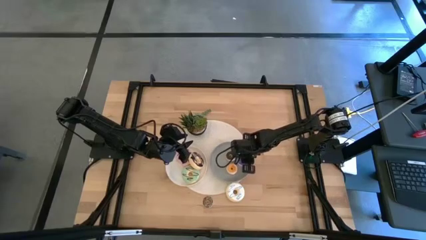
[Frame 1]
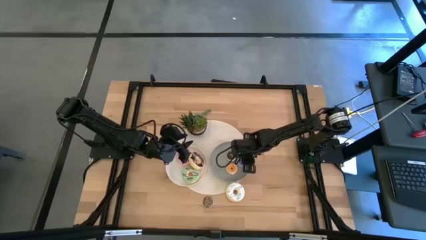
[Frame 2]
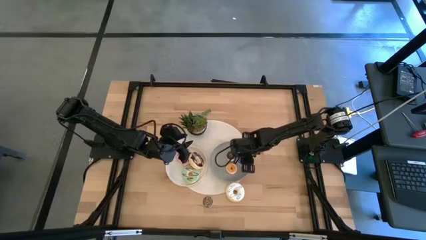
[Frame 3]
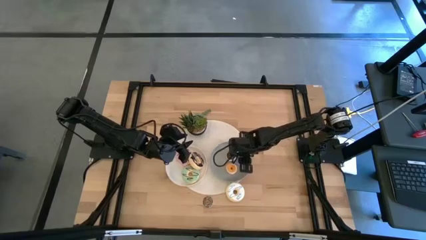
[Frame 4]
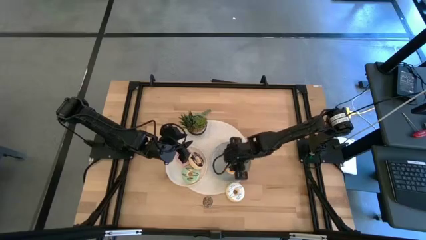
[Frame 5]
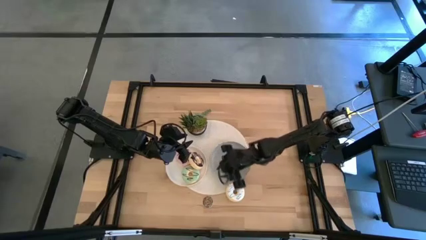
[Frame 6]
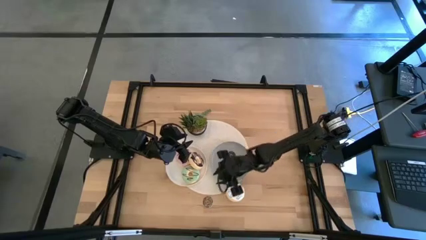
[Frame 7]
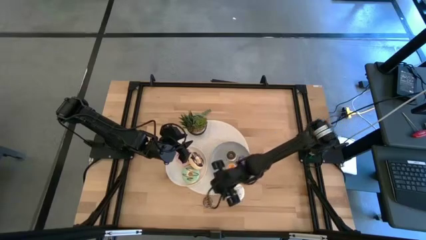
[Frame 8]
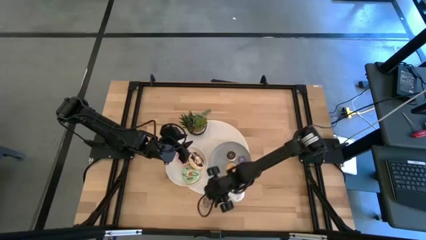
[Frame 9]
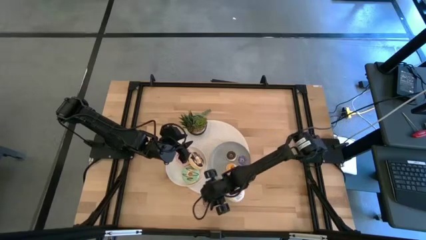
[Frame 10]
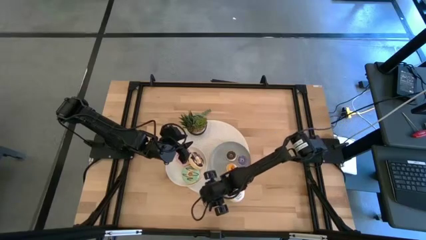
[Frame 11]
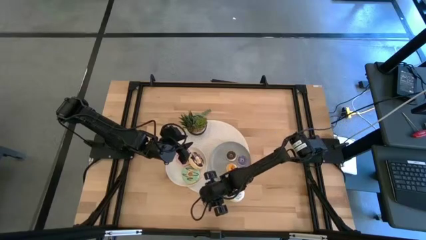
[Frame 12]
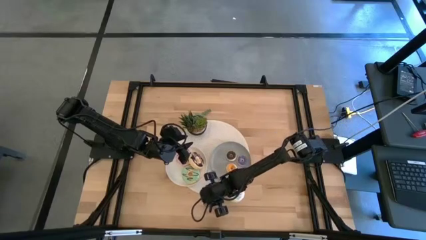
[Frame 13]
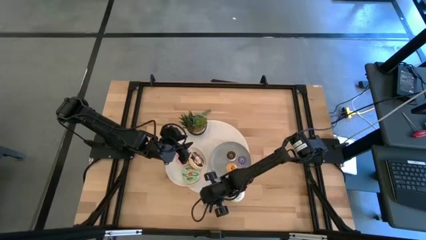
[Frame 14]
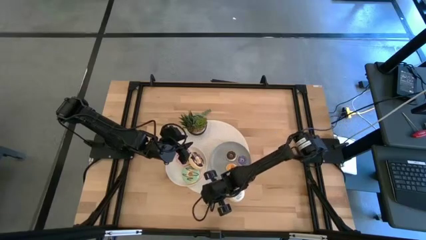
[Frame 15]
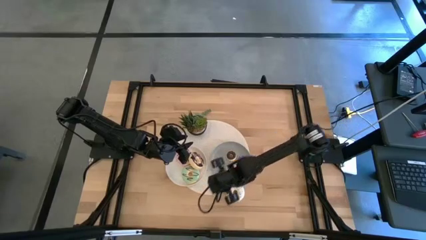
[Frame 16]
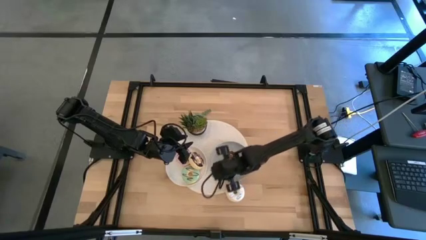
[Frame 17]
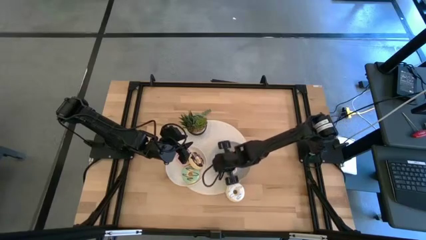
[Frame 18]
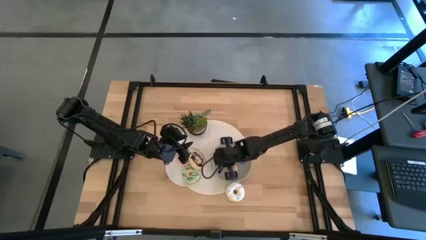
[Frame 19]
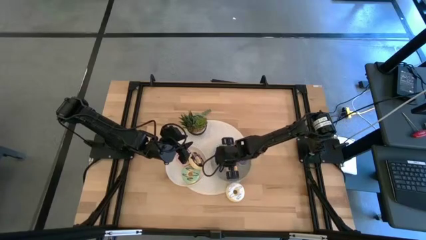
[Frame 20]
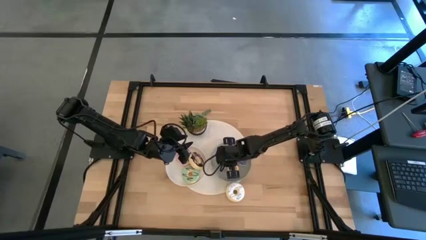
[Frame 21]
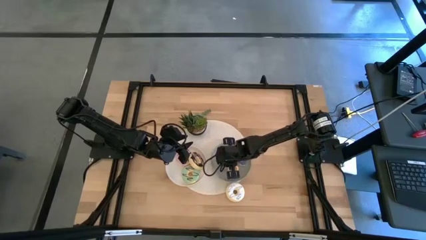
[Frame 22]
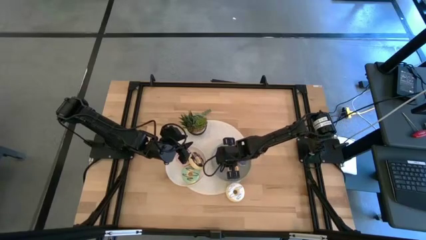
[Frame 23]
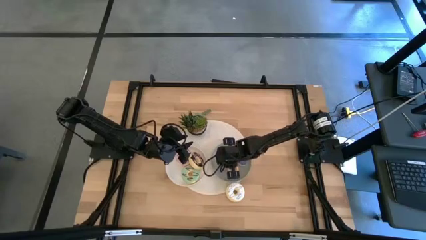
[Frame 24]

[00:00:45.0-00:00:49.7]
Task: Pick & Place donuts
Put the small brown donut onto the gray plate

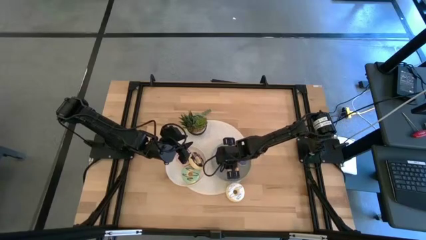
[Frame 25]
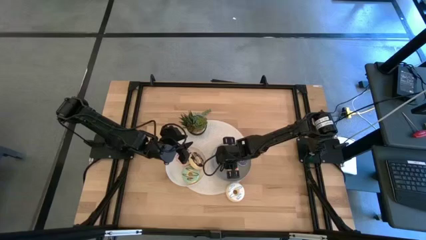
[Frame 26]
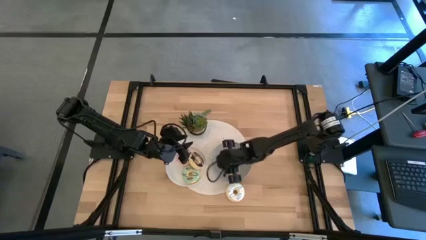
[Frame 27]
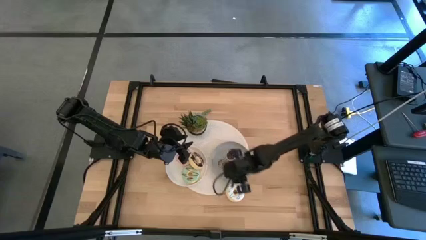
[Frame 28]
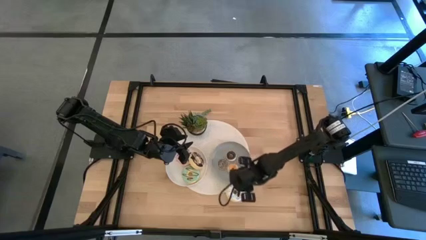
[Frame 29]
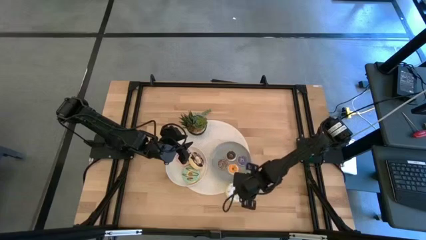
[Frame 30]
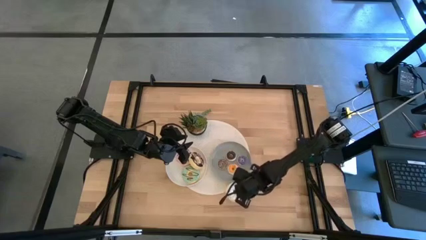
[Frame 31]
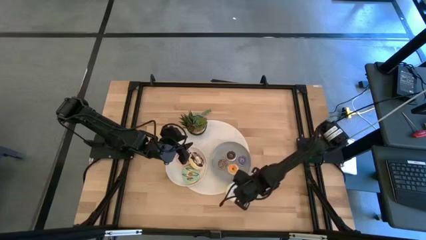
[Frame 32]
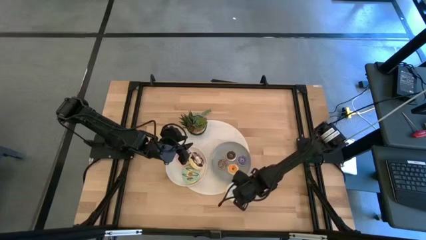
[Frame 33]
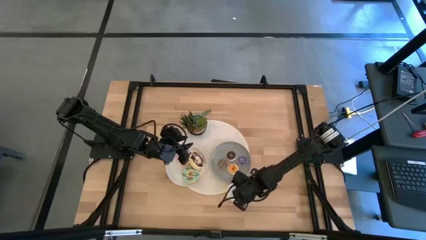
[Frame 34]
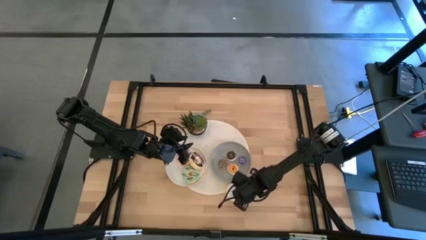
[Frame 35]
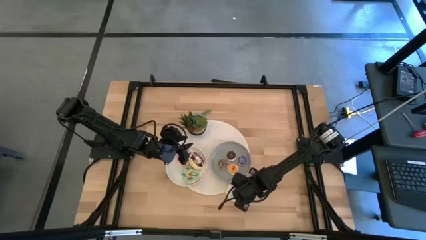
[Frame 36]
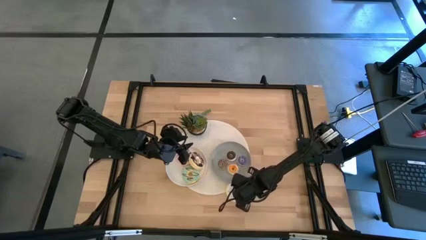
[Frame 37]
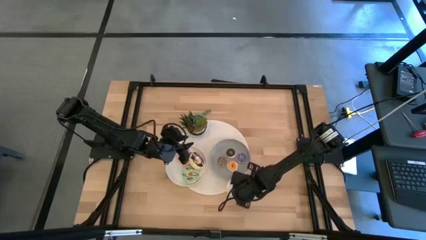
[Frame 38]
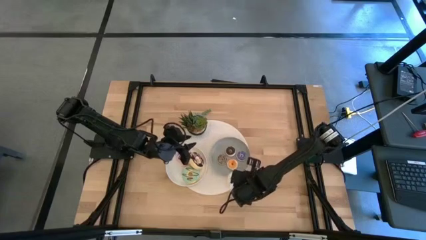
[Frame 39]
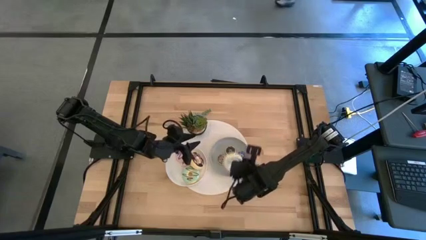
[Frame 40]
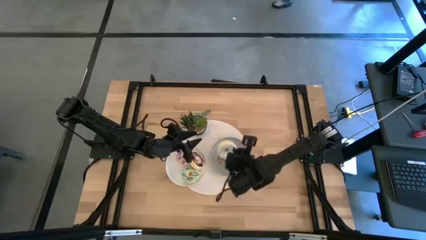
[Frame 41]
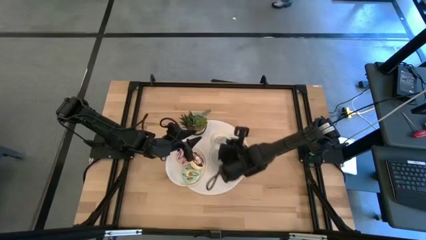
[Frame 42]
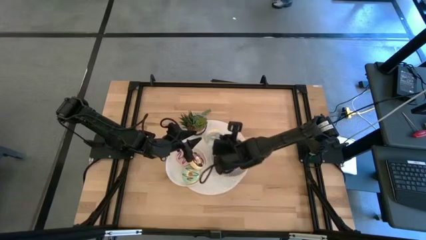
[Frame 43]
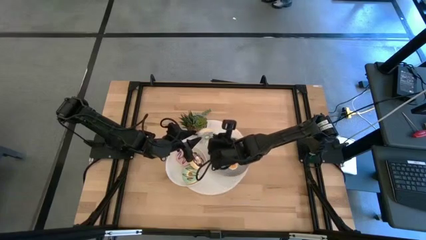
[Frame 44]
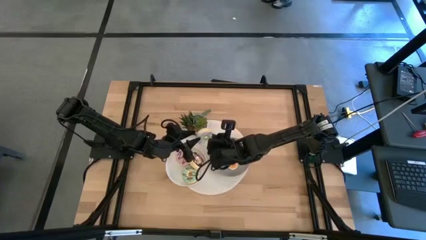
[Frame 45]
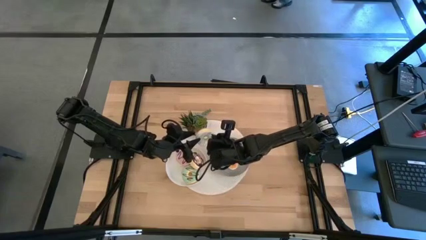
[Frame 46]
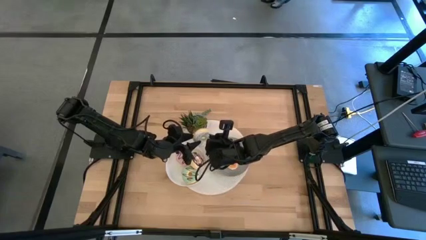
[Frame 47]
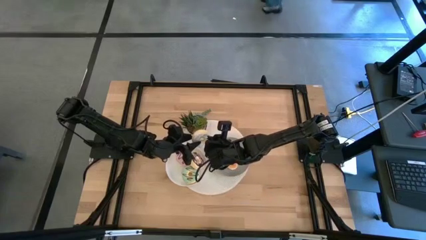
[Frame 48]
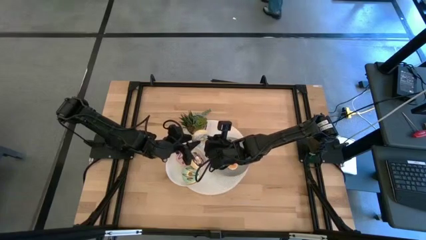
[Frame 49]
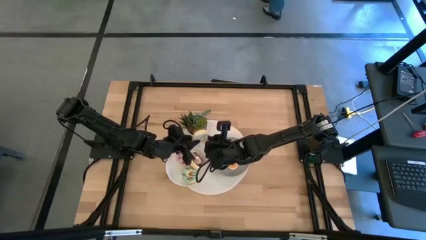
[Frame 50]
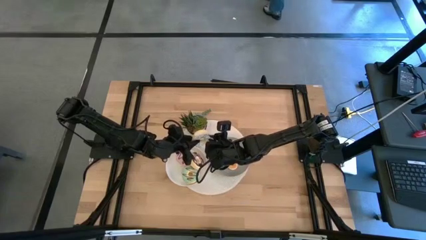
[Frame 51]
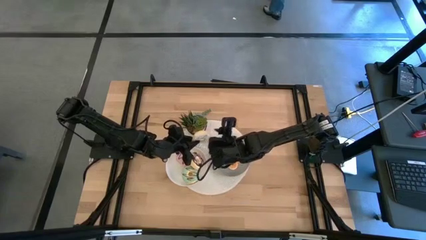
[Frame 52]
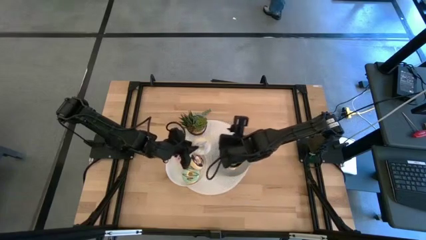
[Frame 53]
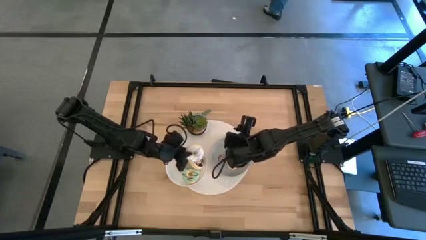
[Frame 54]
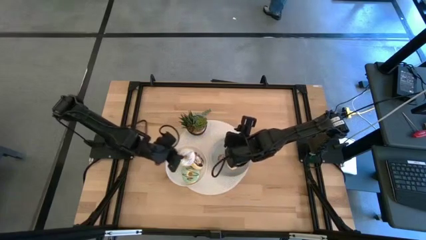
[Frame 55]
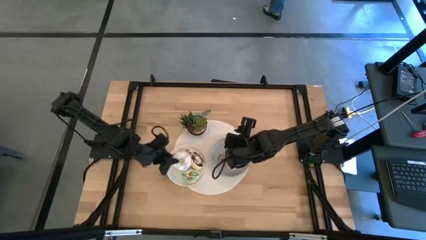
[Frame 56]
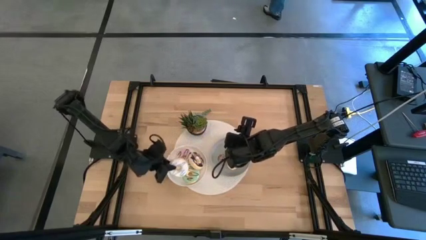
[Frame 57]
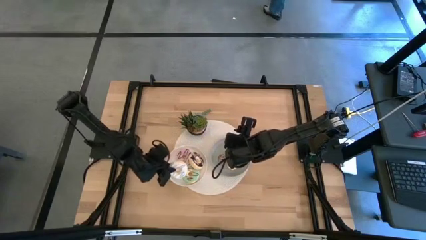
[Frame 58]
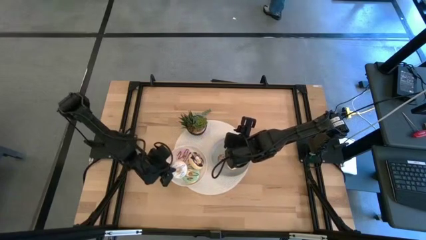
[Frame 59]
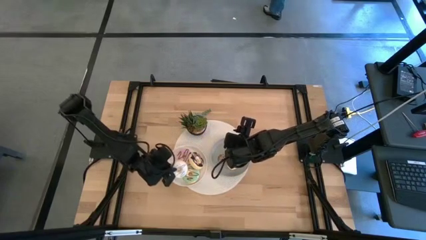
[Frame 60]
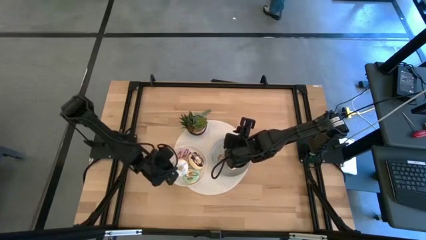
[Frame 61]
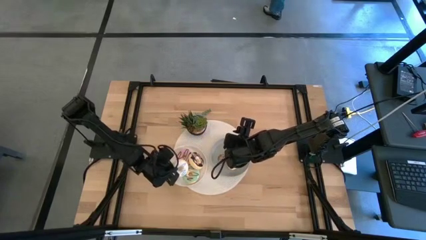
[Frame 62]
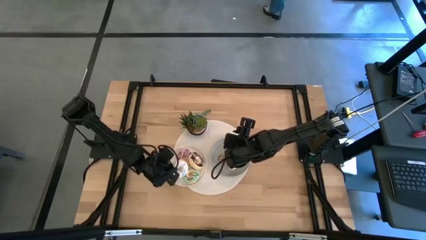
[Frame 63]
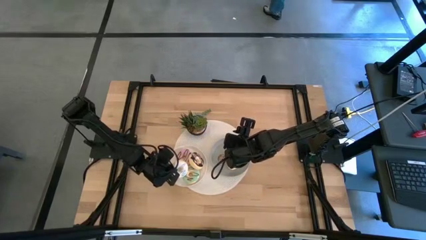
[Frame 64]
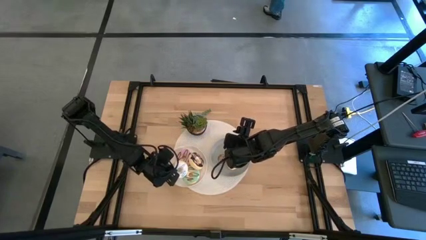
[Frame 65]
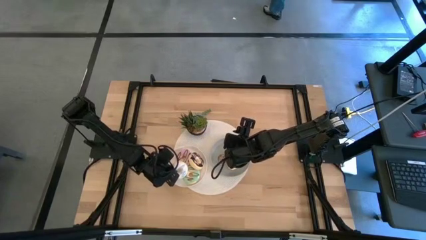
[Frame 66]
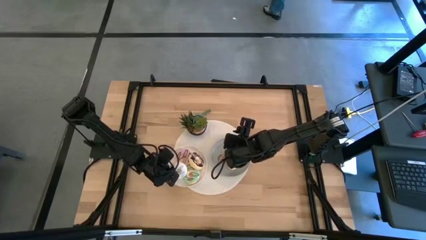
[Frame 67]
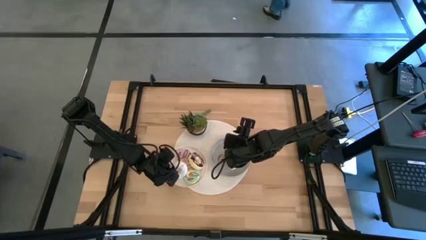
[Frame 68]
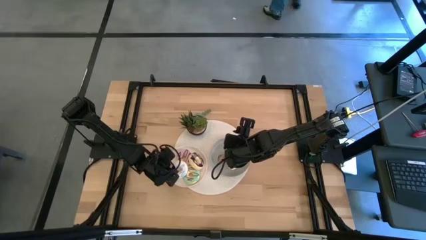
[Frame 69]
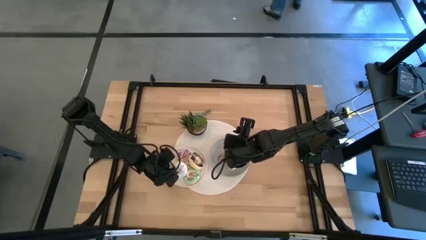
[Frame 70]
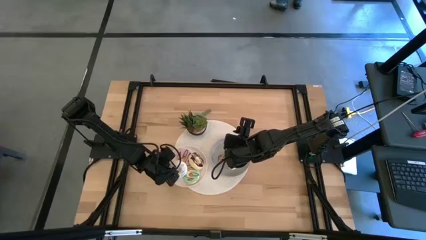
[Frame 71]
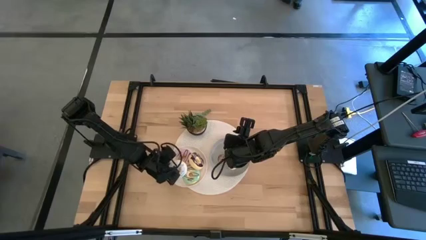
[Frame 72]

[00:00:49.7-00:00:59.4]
Put the big white donut onto the white plate
